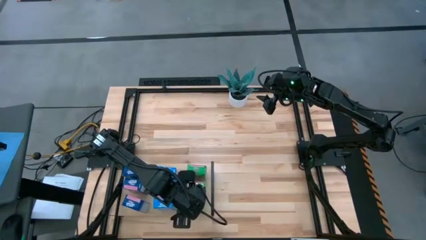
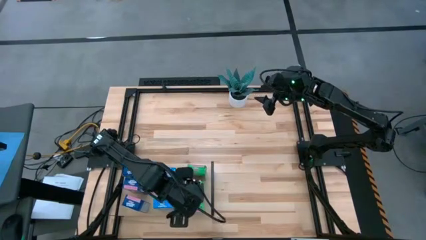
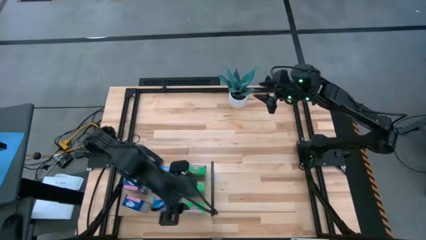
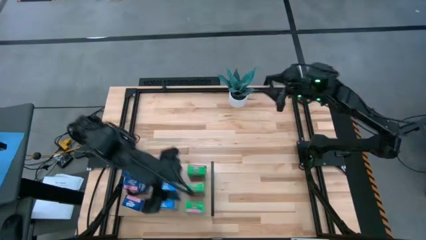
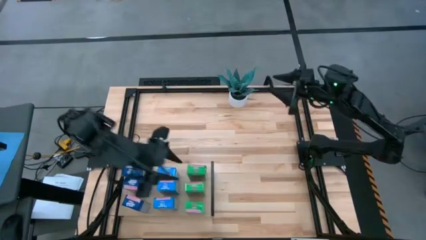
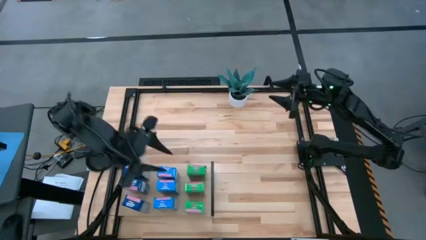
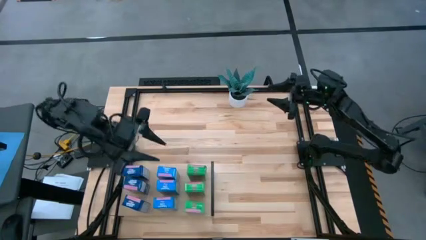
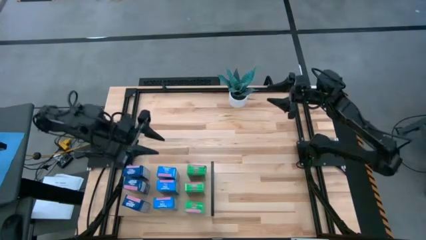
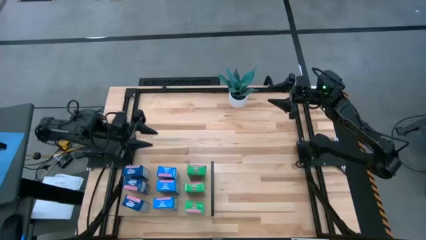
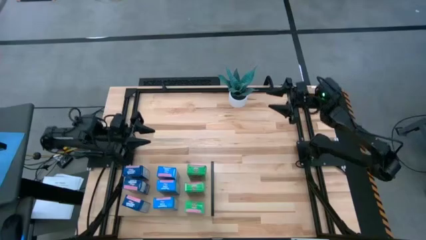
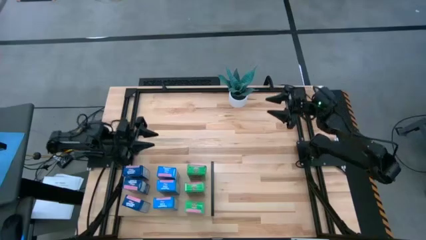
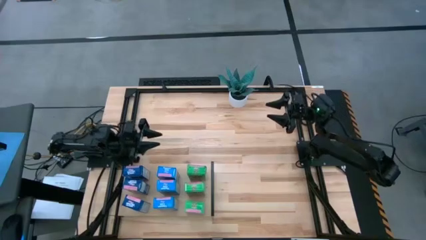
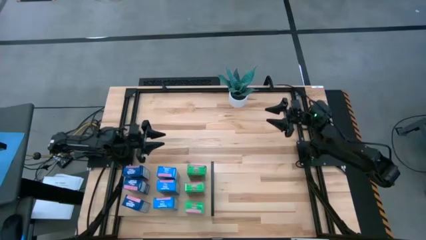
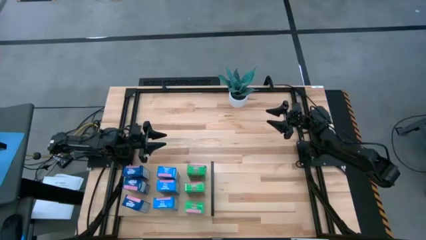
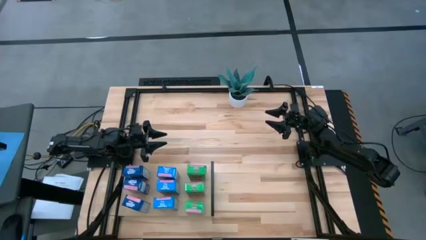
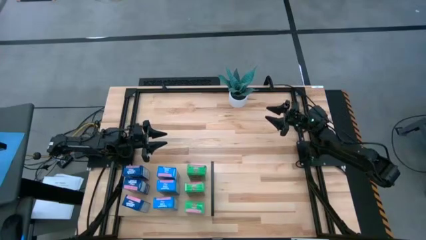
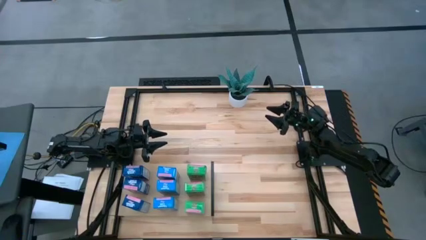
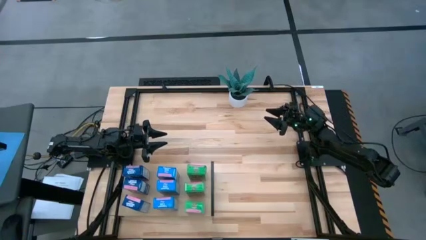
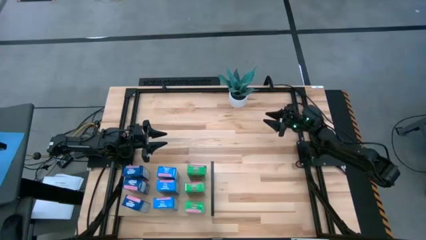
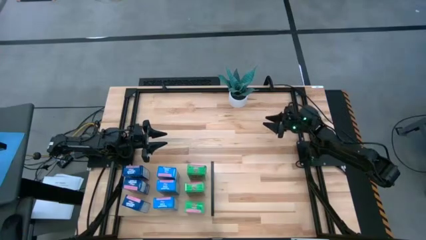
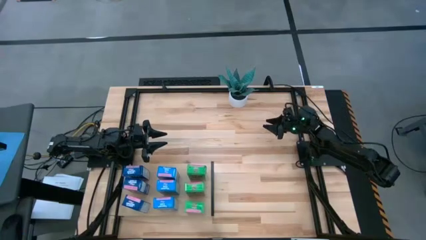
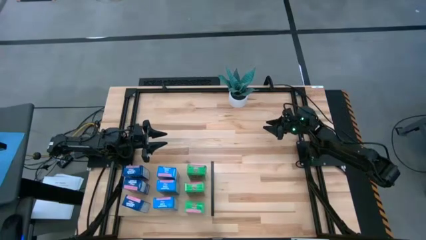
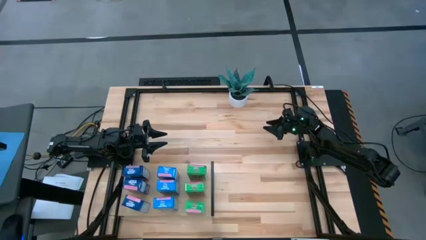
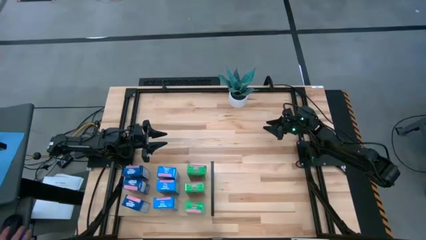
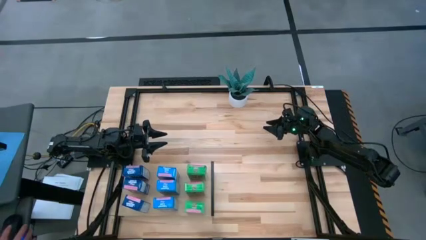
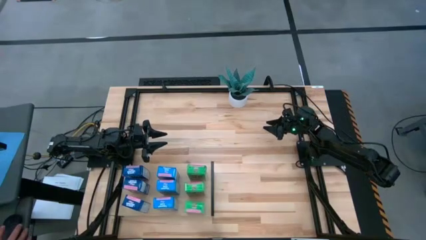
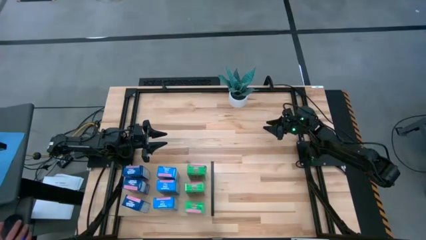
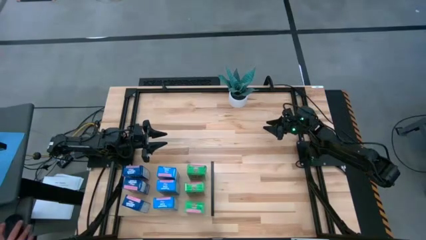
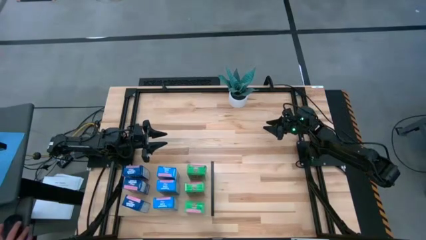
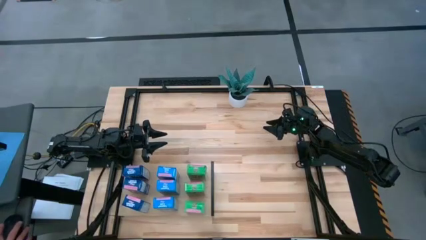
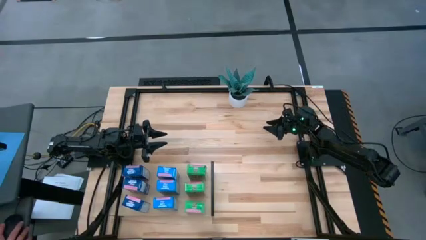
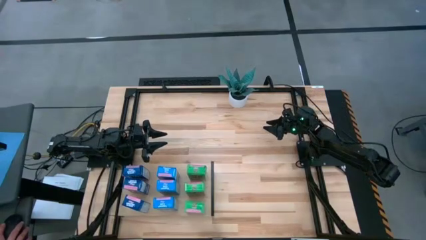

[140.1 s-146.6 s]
Task: Stack cereal on shelf
Return to Home Position

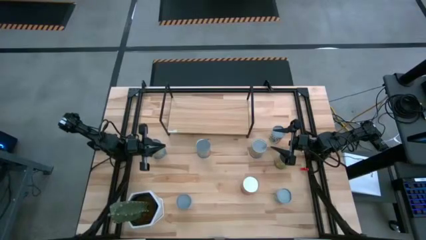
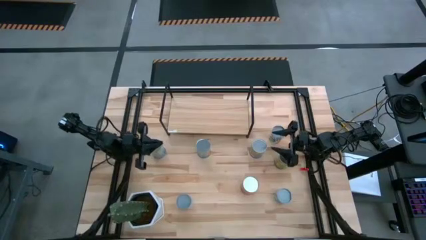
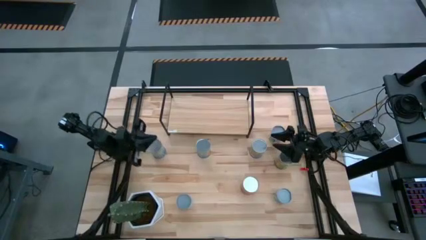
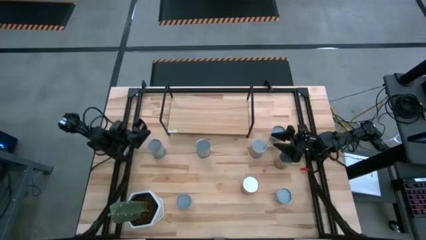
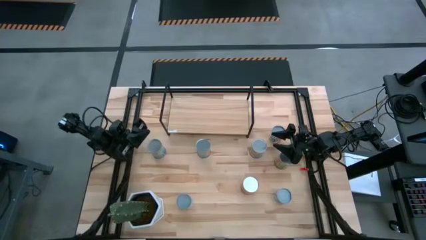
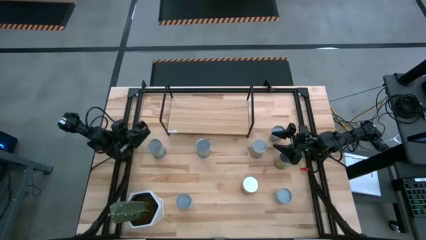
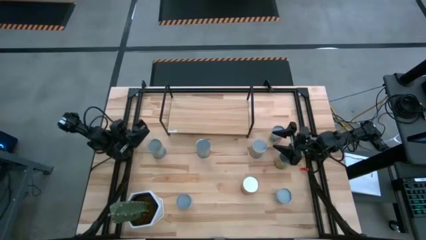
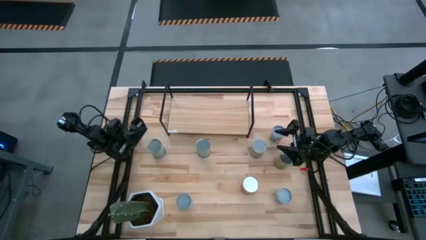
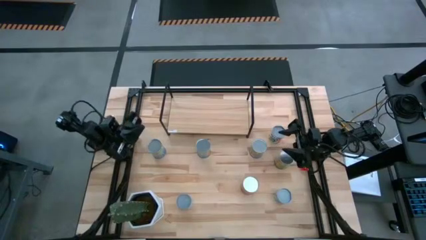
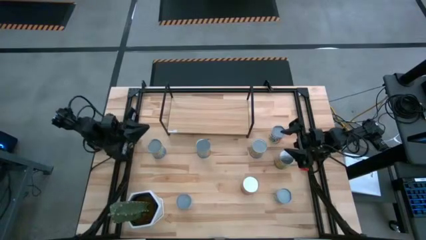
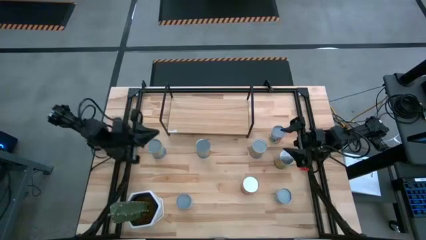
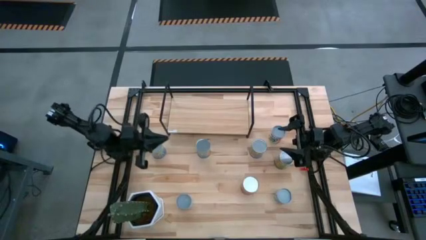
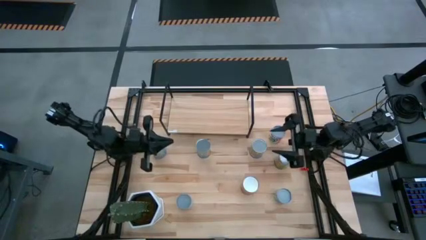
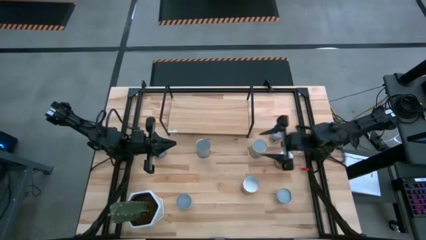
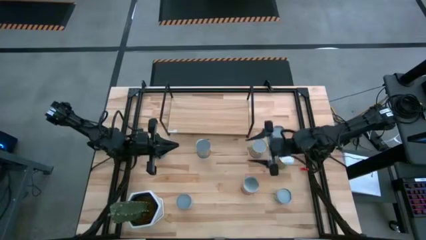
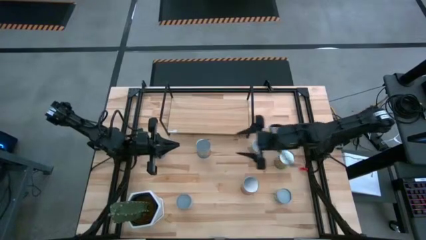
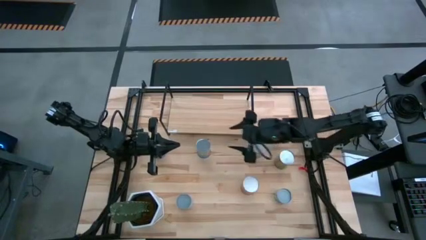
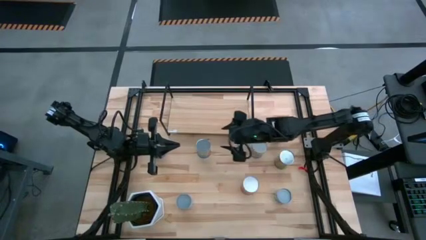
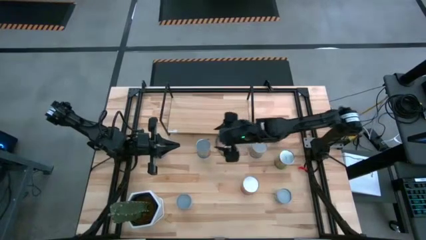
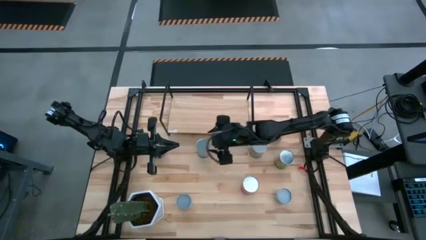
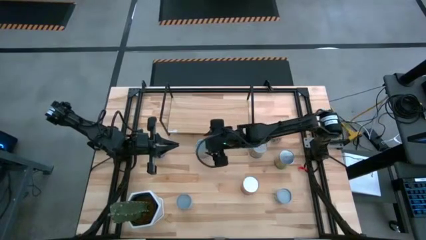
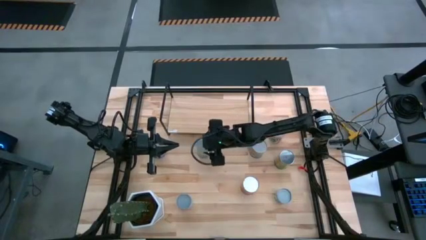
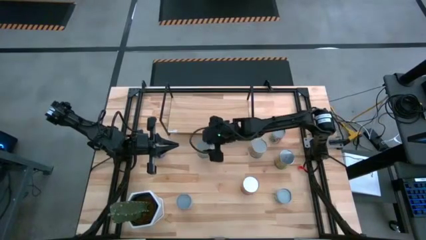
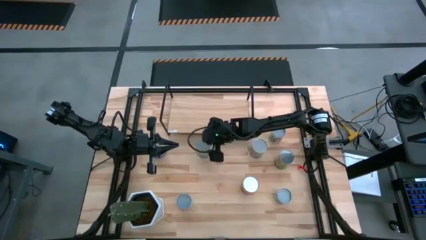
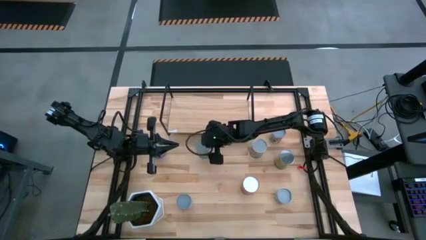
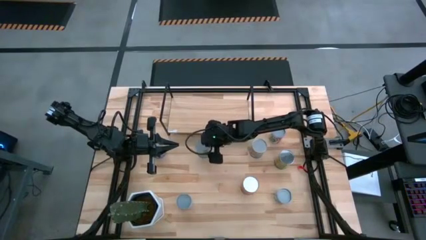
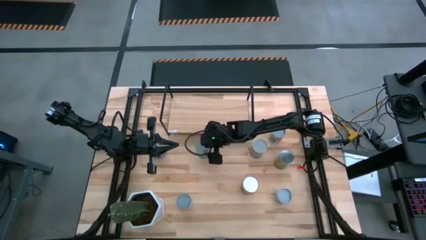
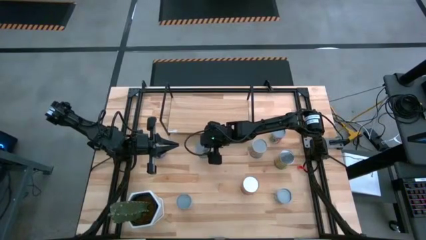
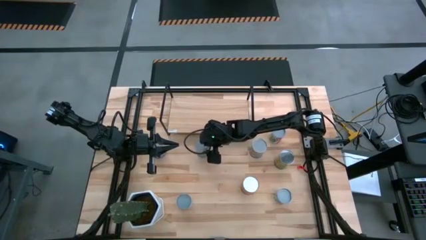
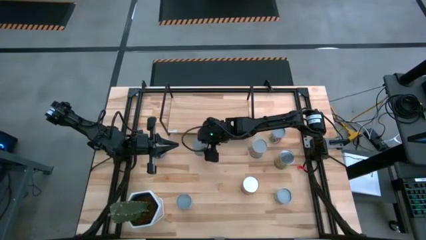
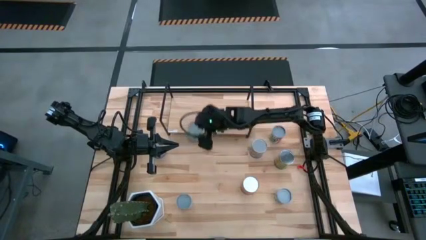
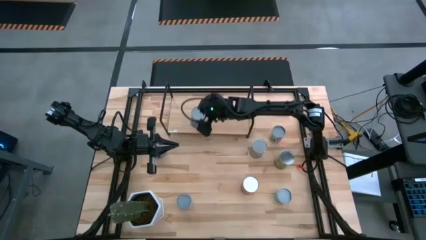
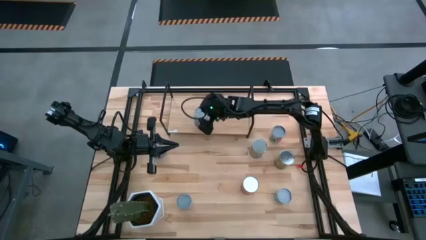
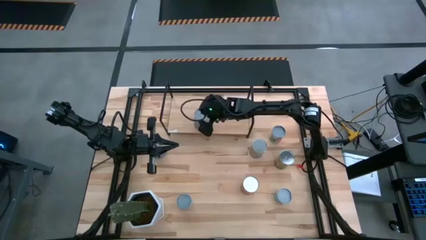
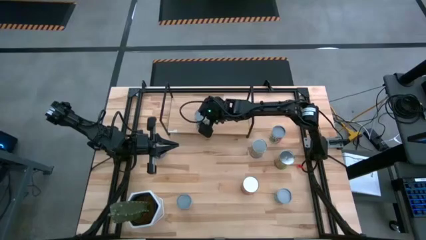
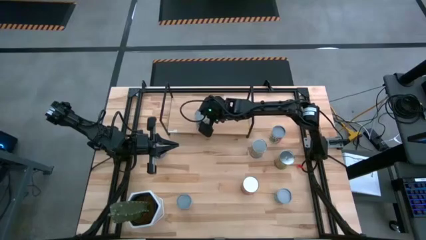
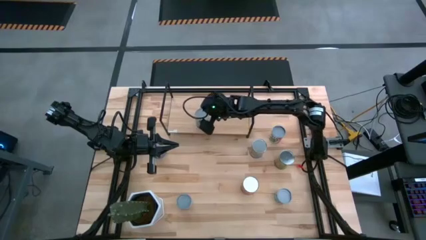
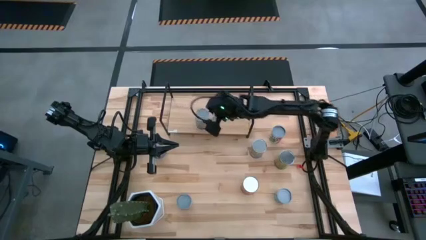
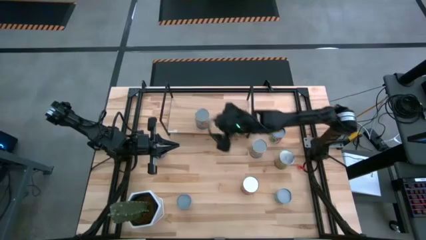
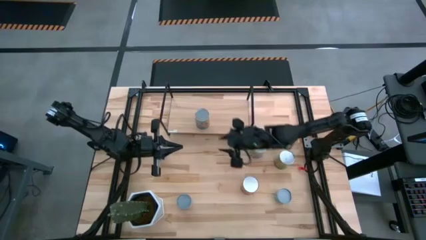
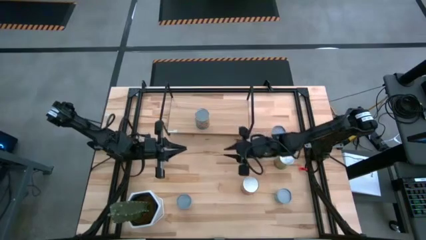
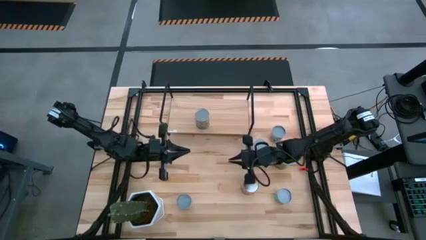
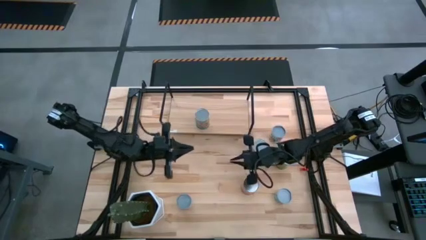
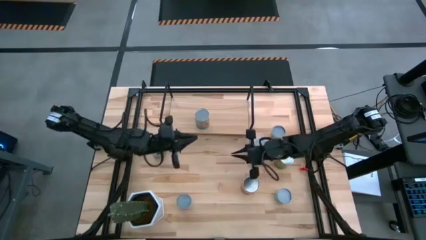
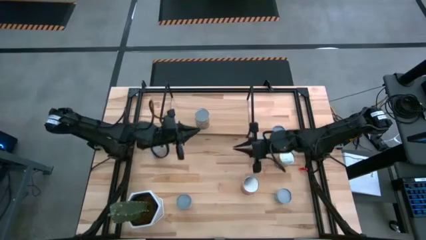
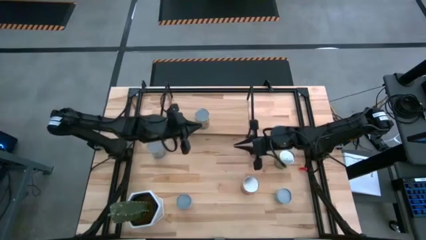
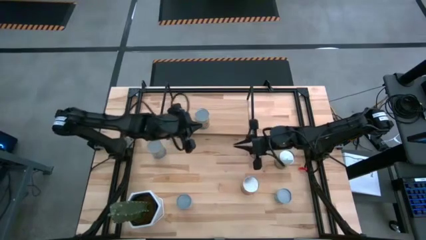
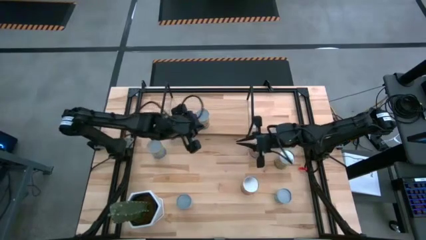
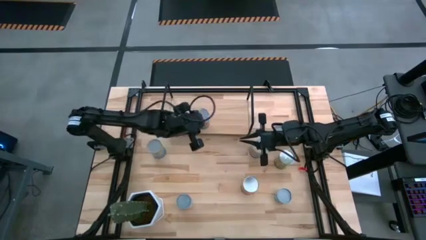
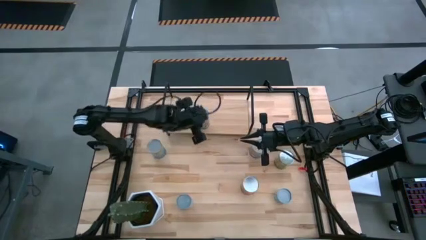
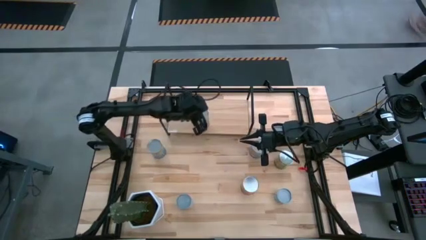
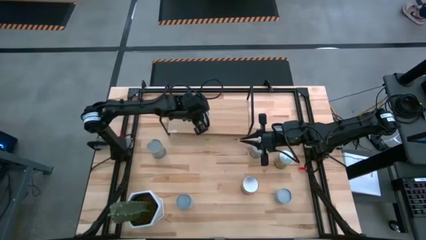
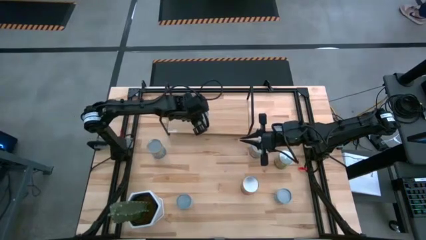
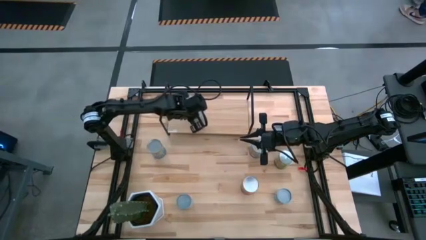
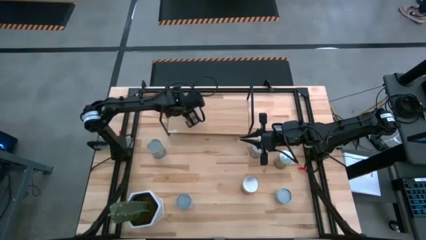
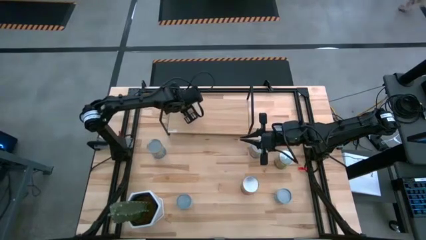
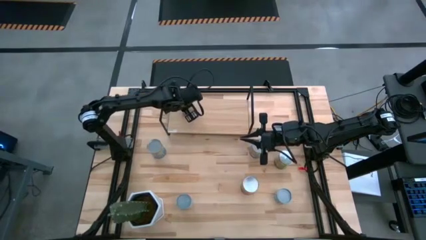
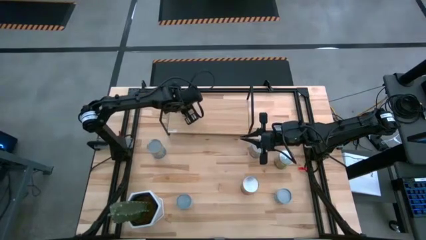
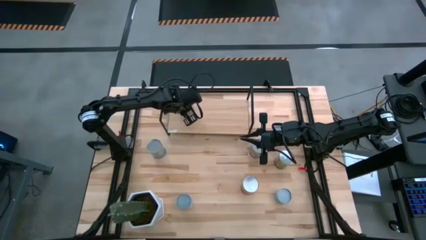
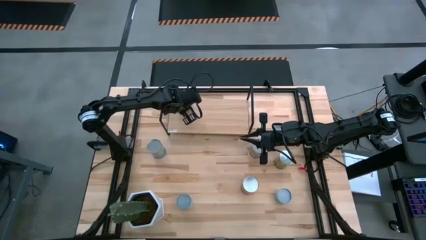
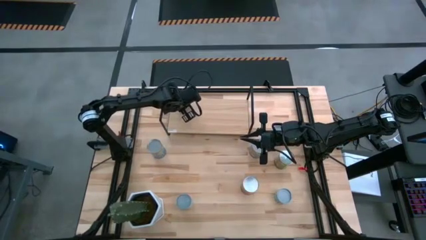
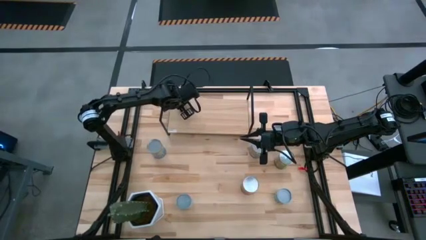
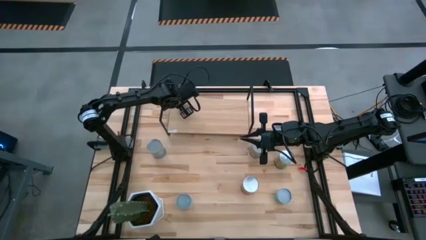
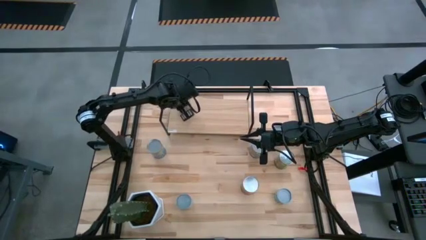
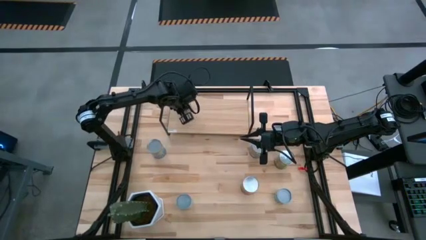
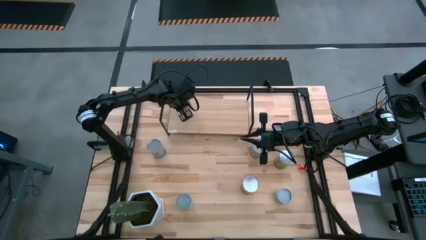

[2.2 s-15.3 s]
Task: Pick and place cans onto a shelf
Put the canned tomatoes on the shelf
